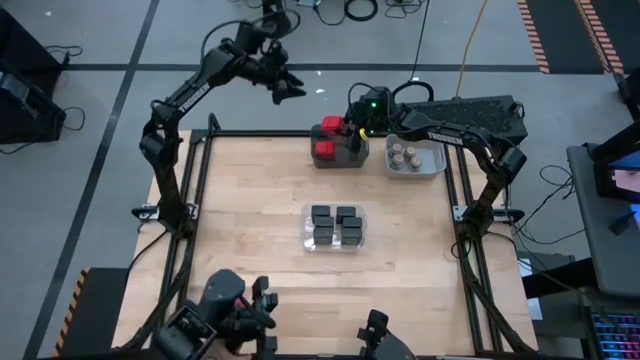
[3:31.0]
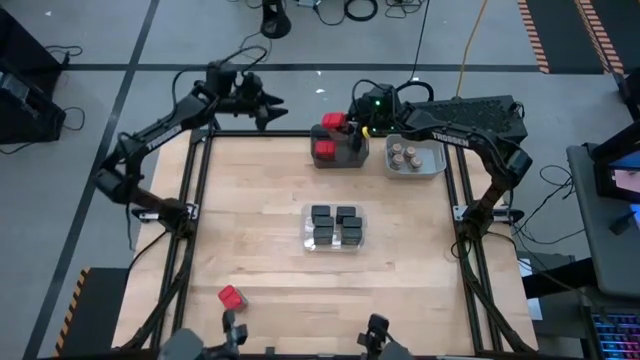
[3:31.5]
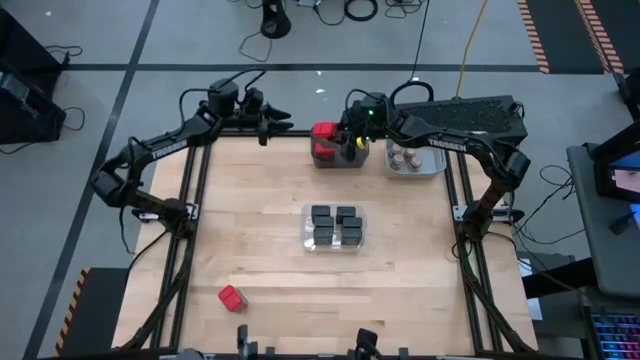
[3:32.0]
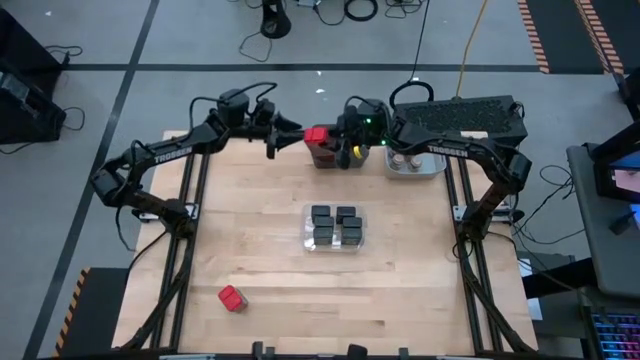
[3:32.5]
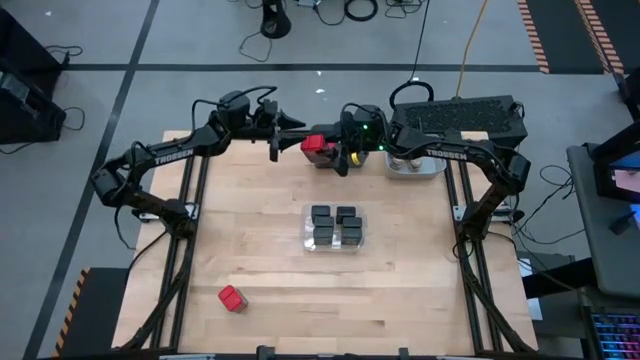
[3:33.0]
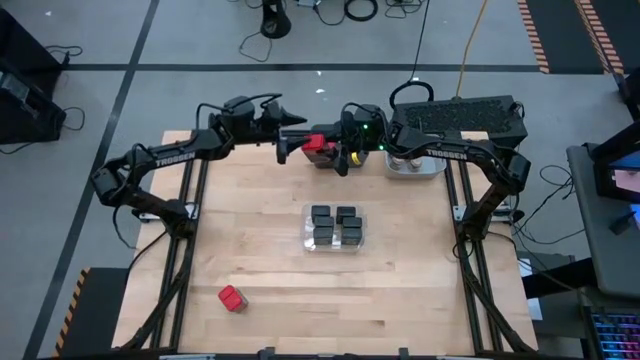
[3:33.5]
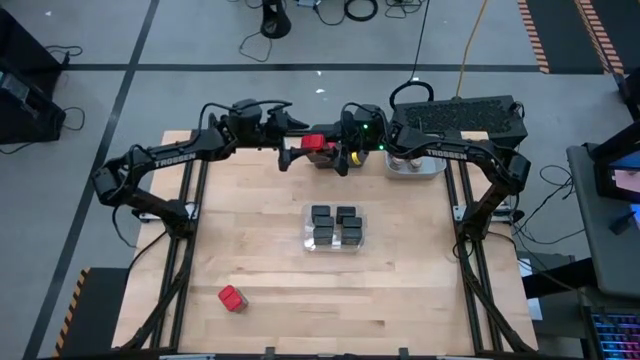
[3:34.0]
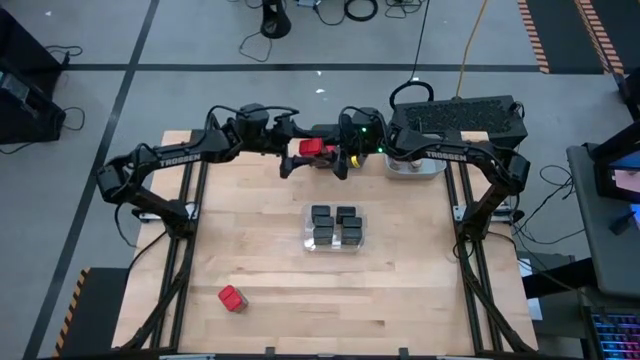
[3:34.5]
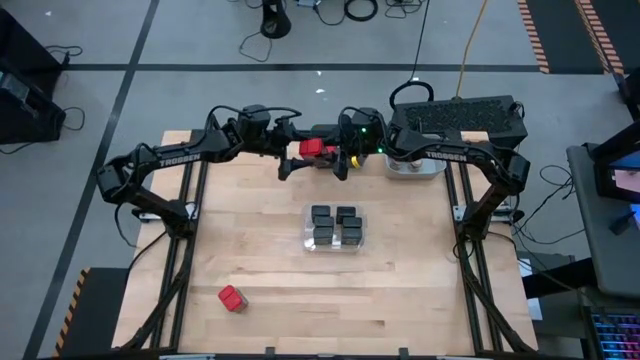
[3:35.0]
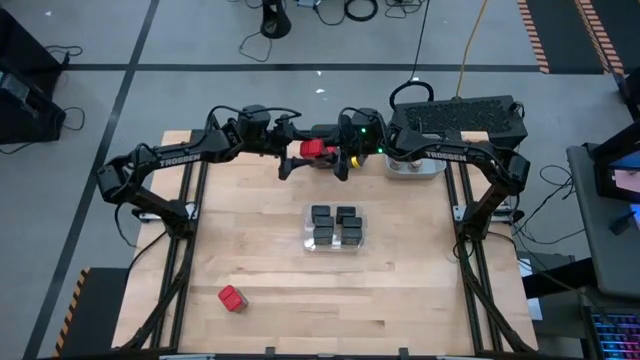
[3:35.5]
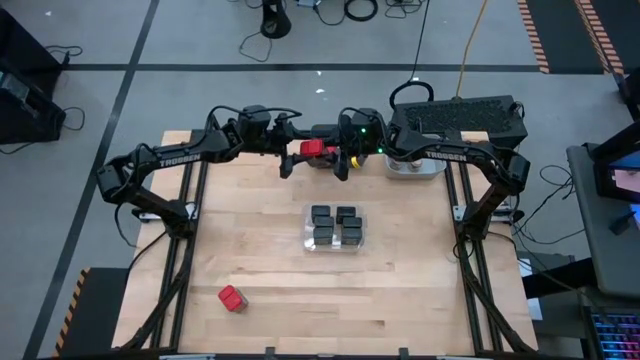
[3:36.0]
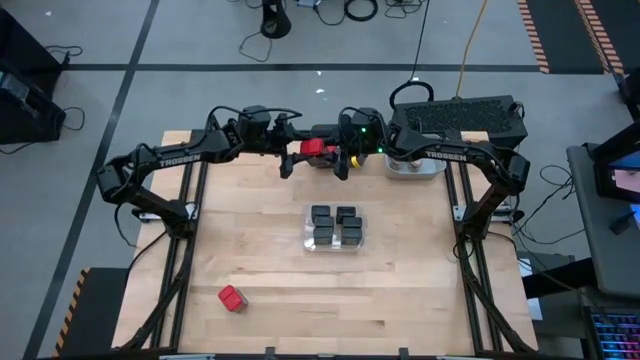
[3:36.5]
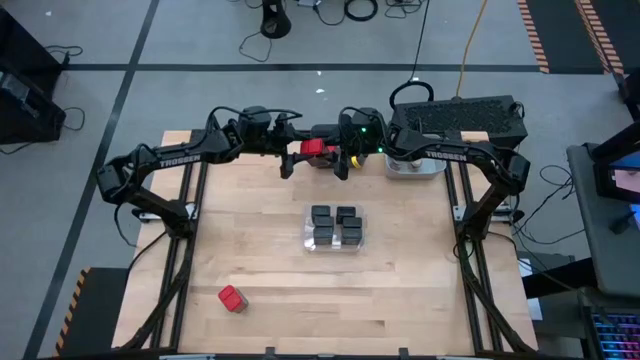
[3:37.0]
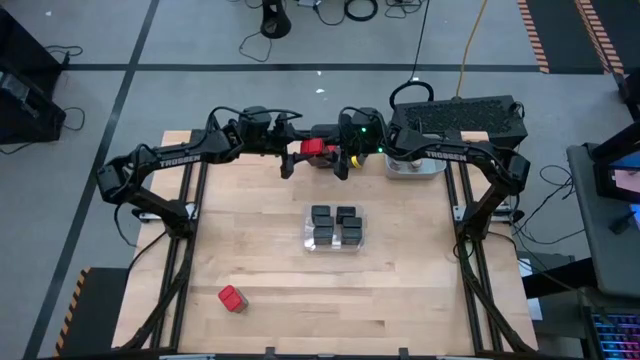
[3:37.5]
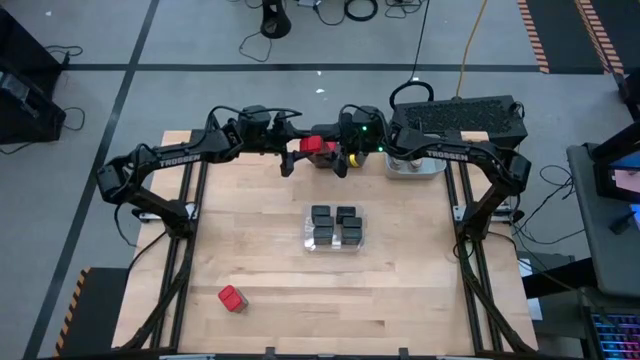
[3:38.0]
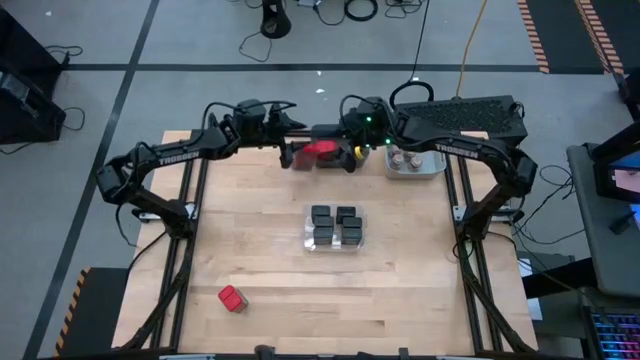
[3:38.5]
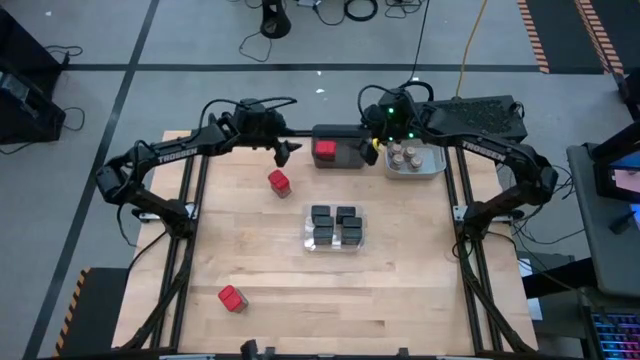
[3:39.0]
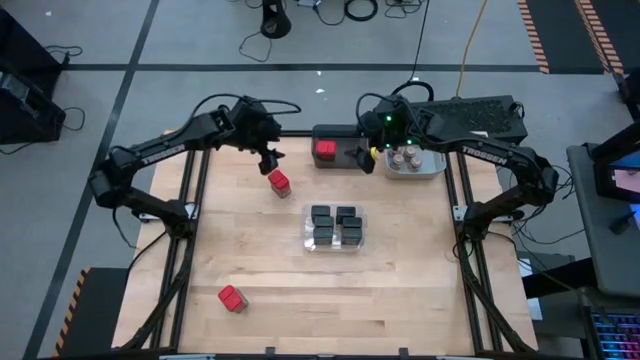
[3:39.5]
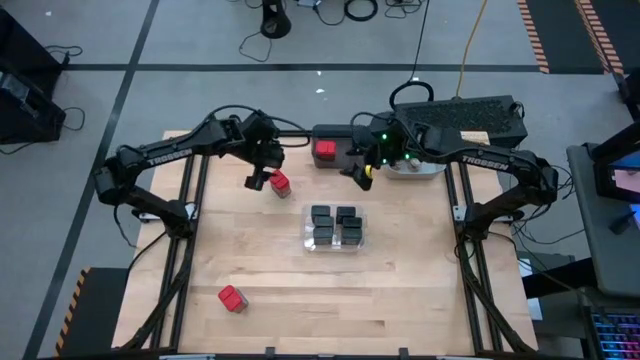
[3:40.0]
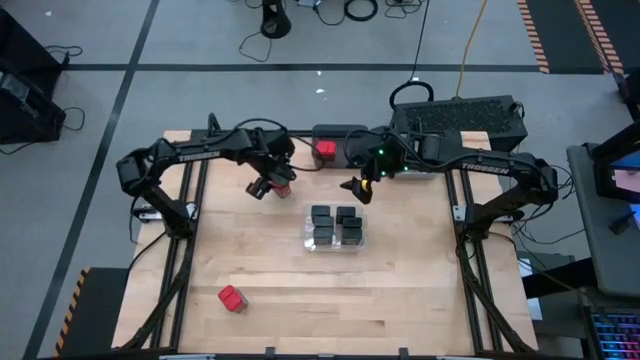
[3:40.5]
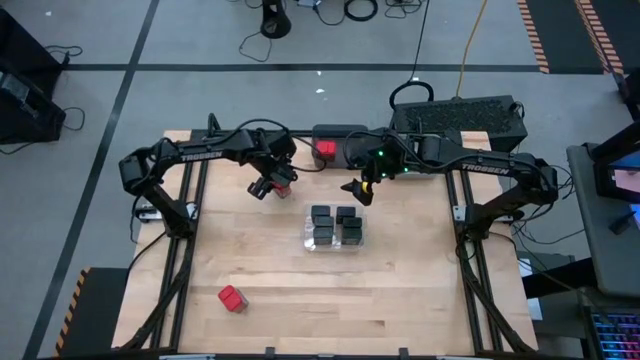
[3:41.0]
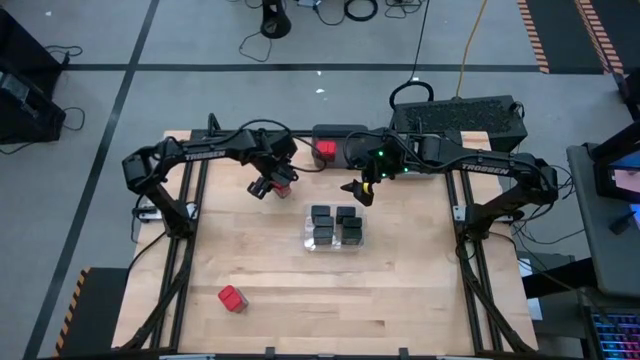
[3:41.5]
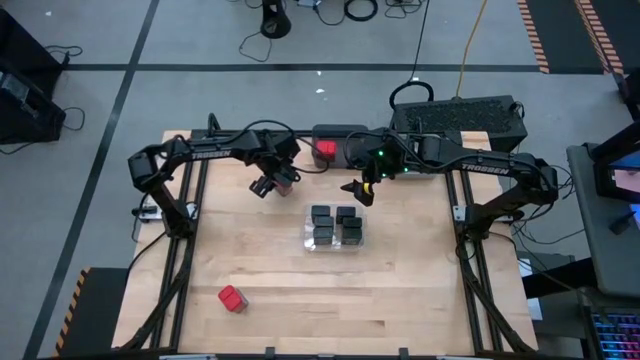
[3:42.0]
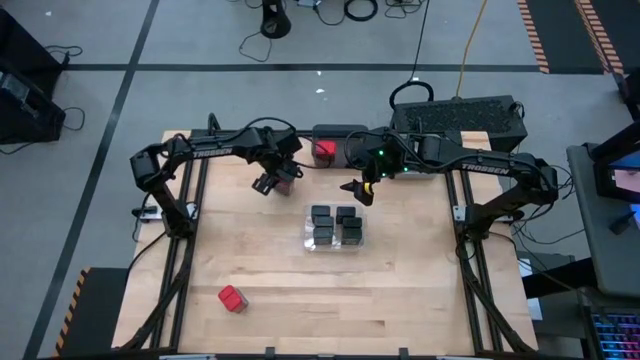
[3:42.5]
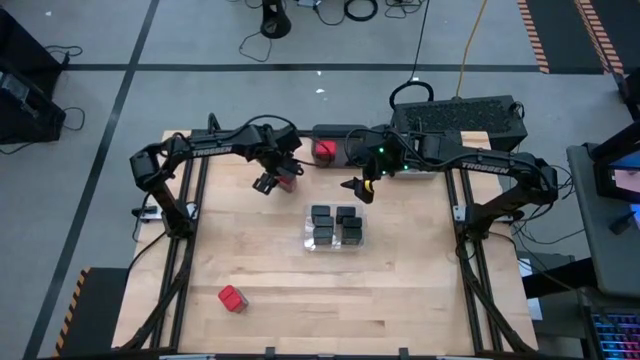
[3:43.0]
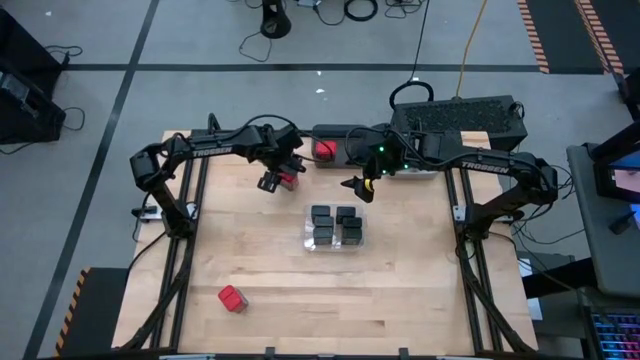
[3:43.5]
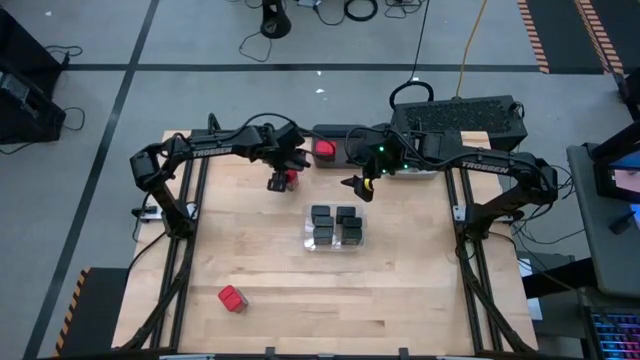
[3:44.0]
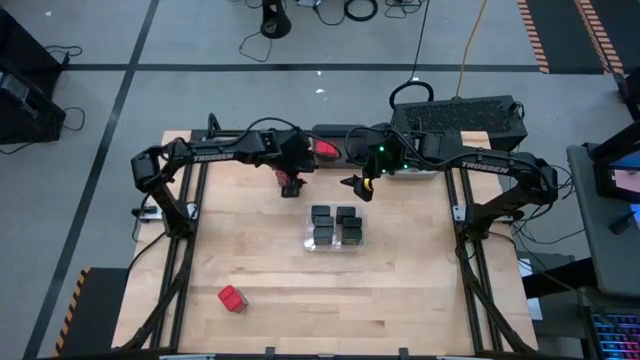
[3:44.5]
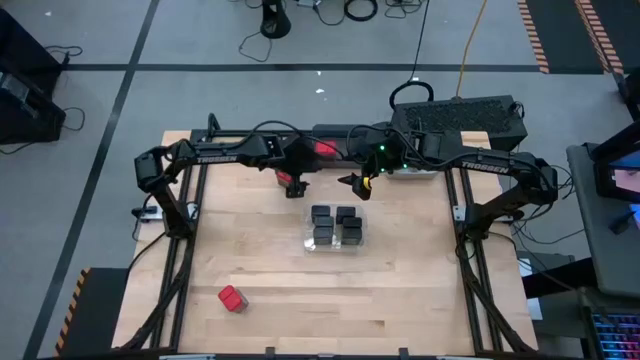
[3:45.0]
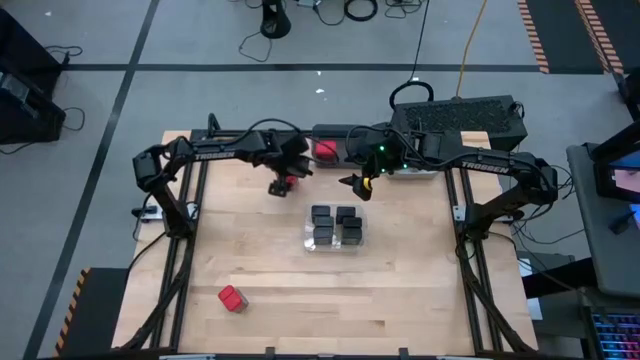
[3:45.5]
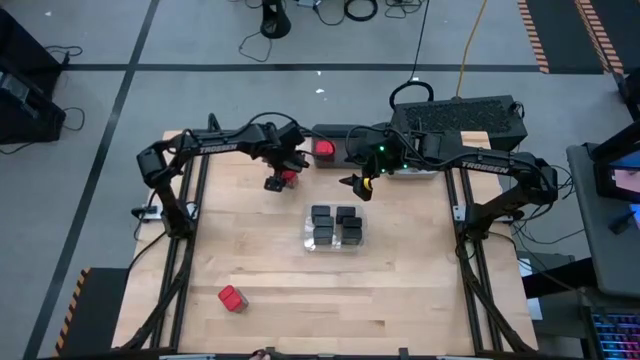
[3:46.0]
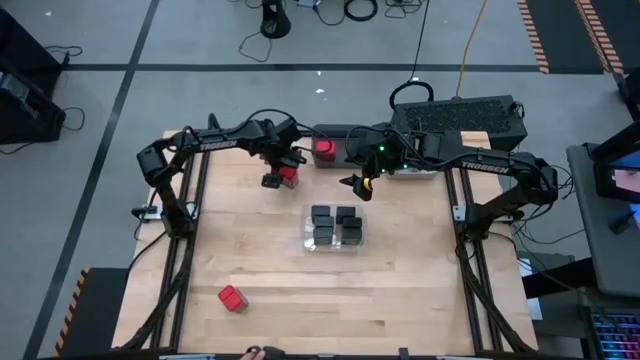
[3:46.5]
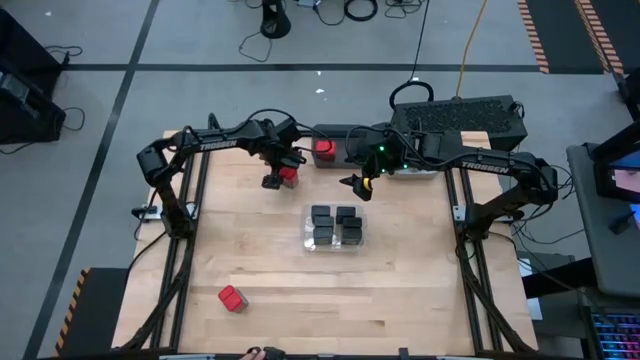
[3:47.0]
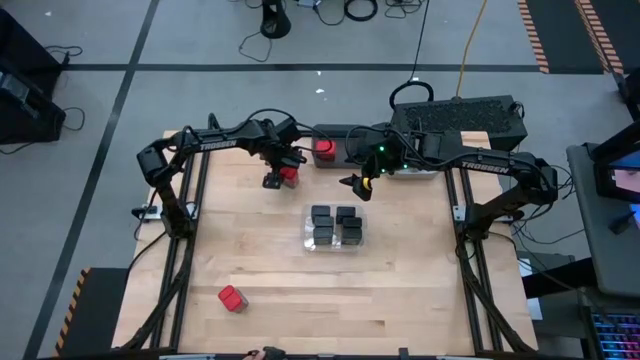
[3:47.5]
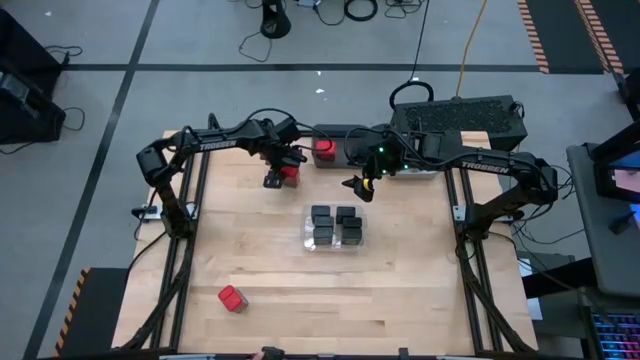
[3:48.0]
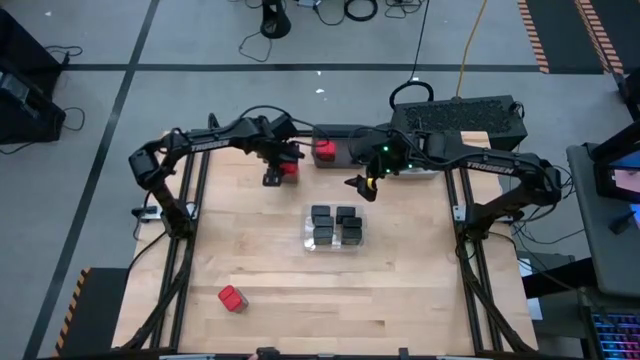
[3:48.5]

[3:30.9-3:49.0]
Task: Sort spices by type
Put the red seasoning can into the black bin

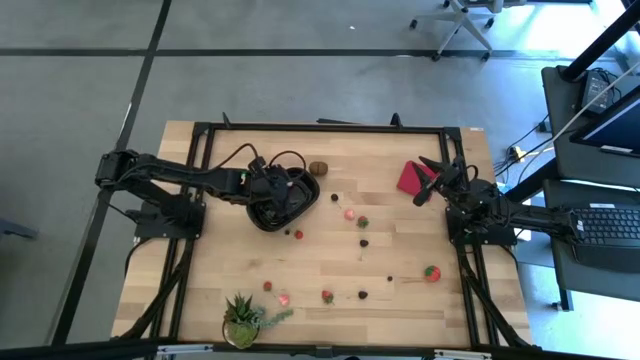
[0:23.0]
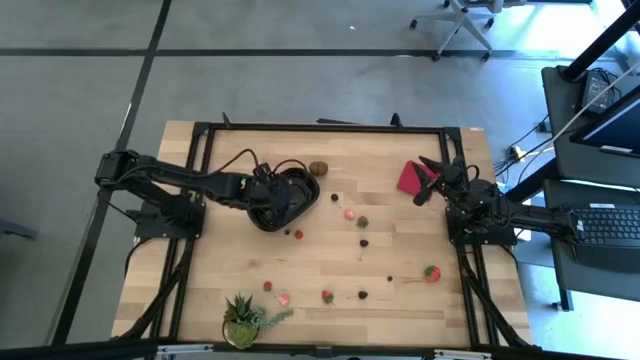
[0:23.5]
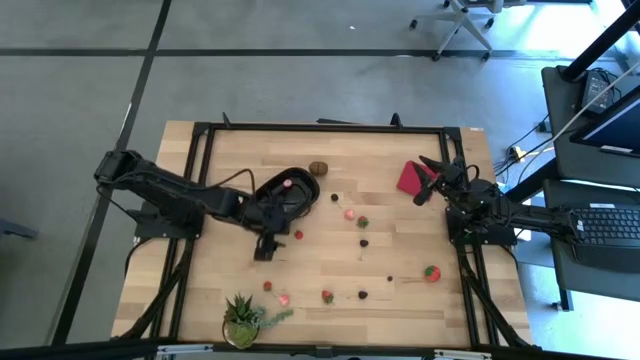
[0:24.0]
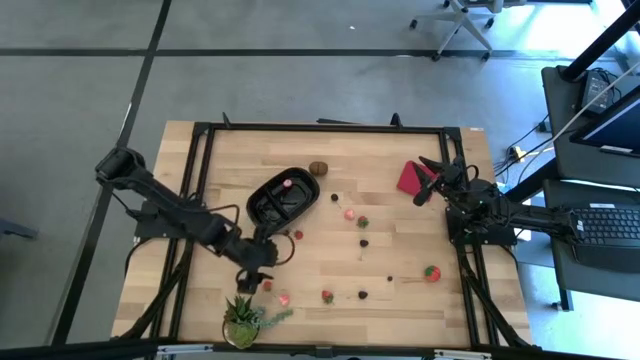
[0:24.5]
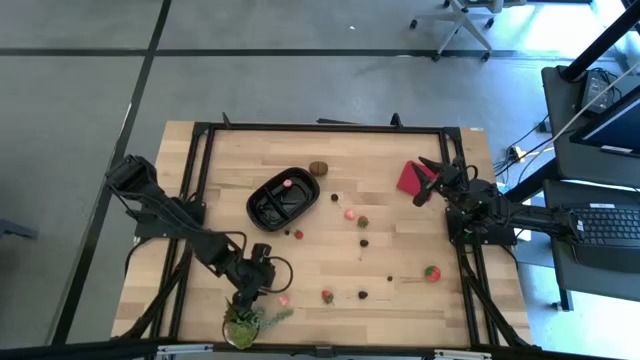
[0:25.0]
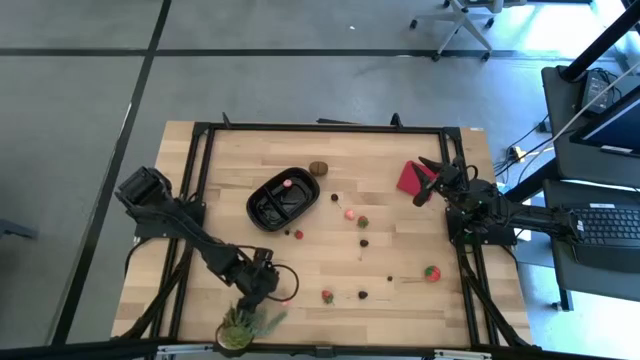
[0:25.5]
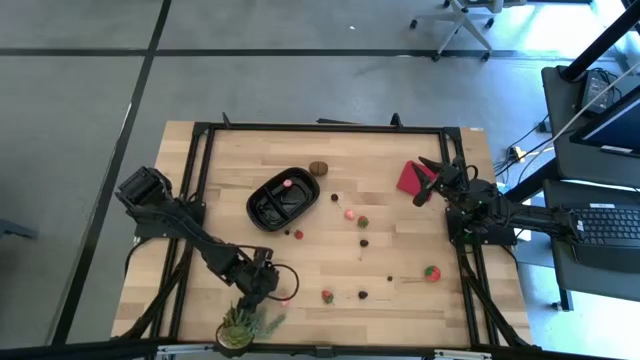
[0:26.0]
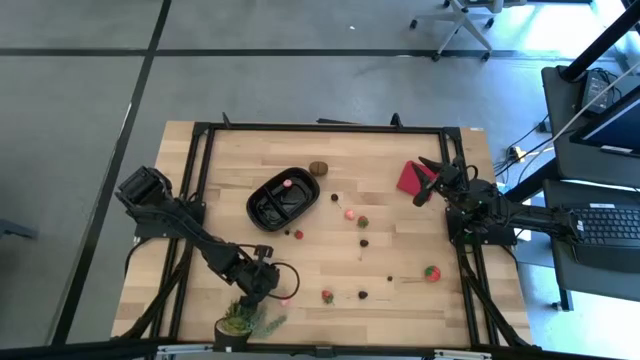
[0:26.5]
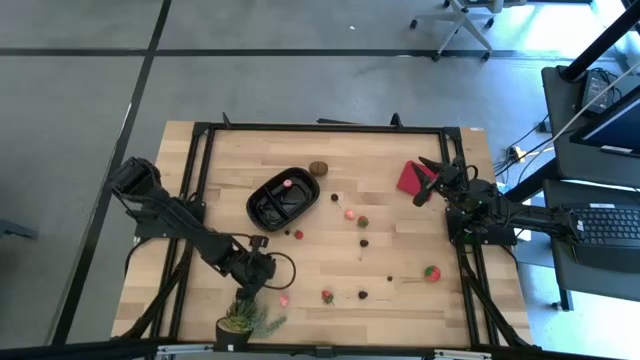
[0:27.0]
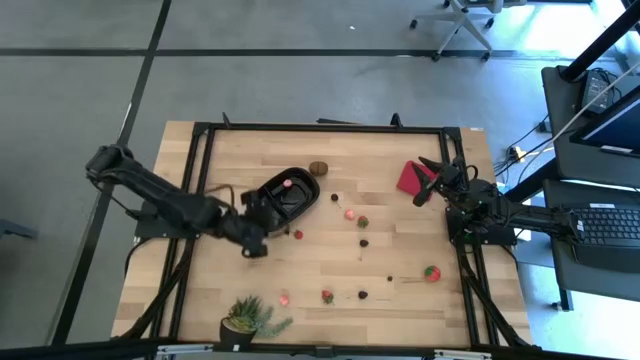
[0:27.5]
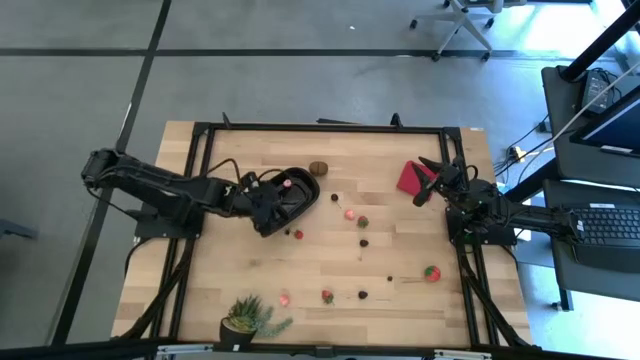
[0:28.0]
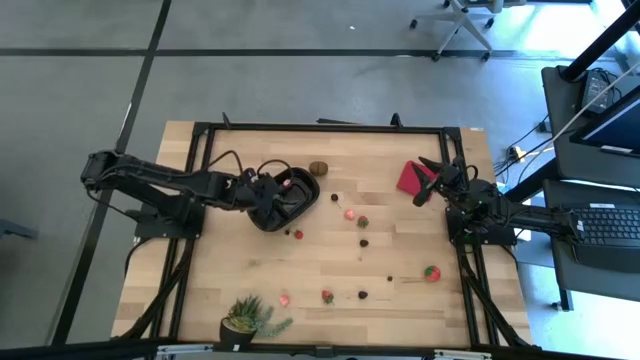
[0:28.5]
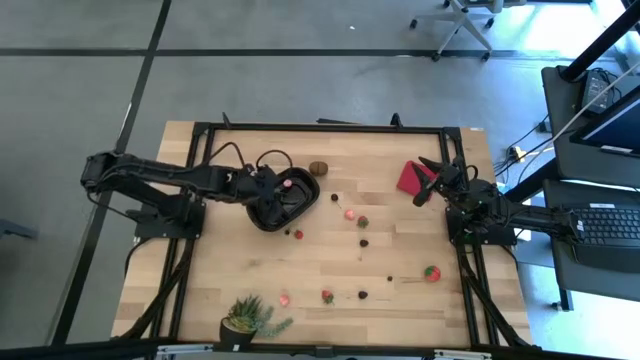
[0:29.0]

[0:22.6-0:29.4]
Task: Pick and placing Produce into tupperware
Put the red strawberry into the black bin
